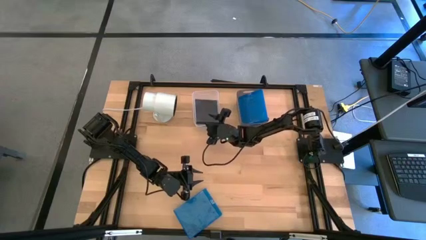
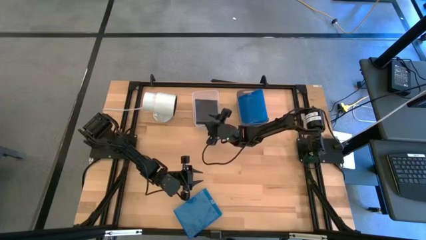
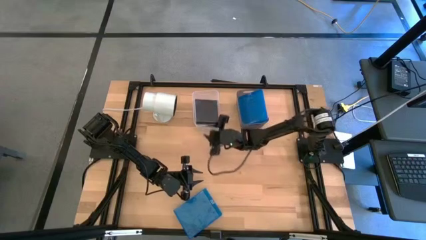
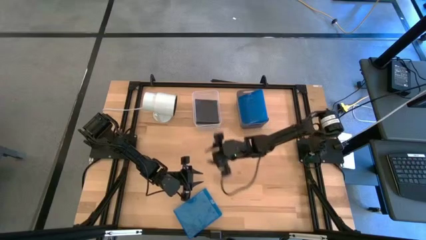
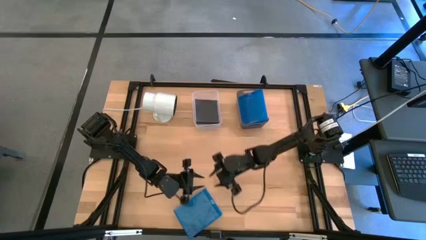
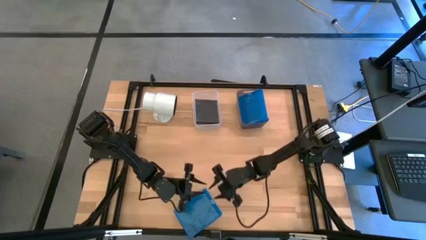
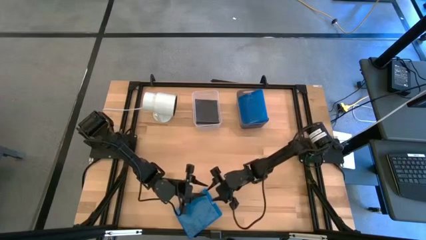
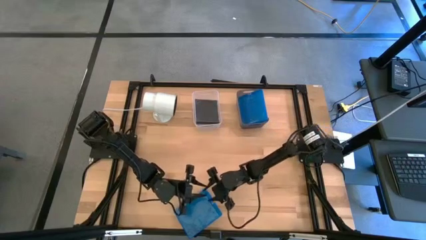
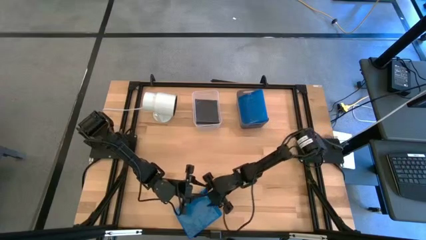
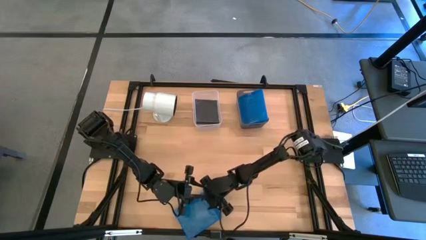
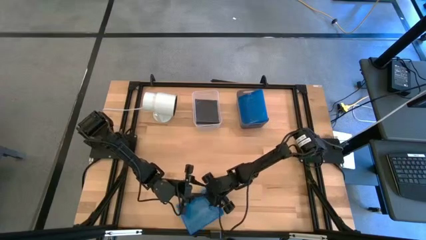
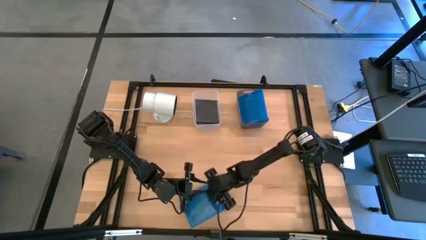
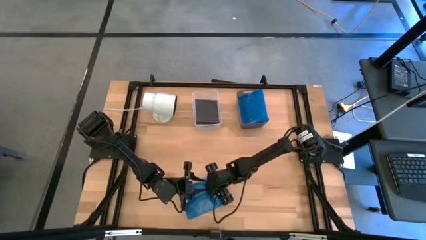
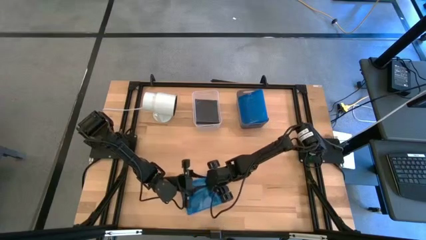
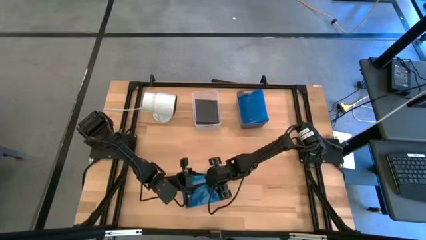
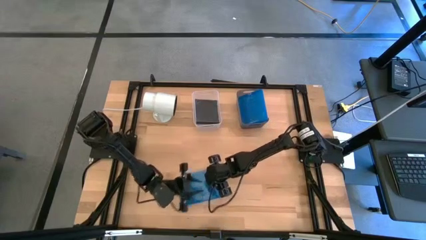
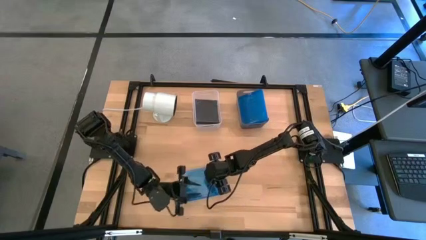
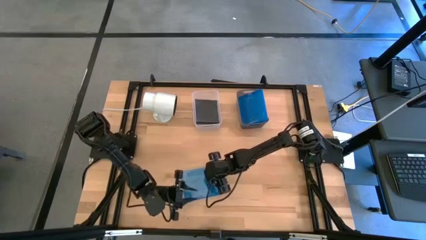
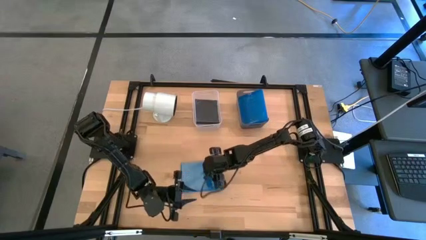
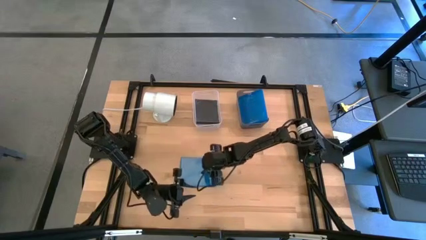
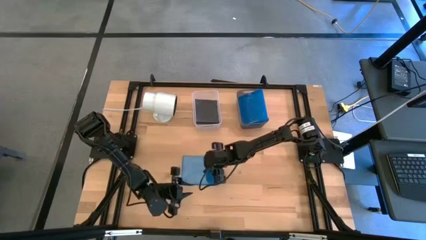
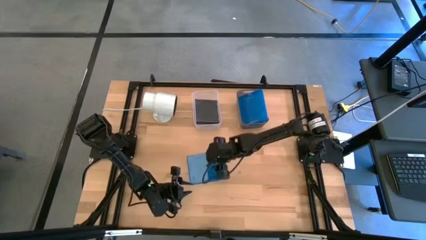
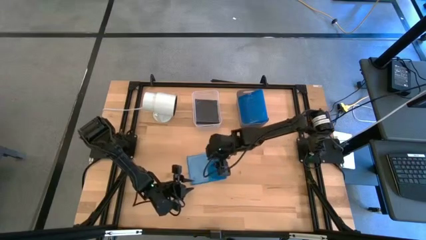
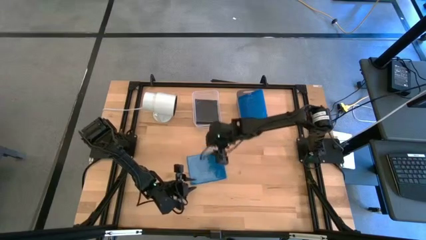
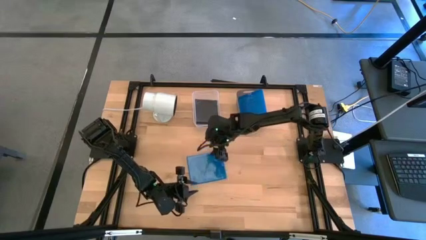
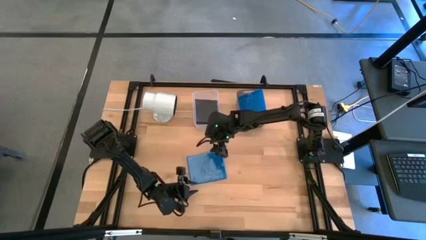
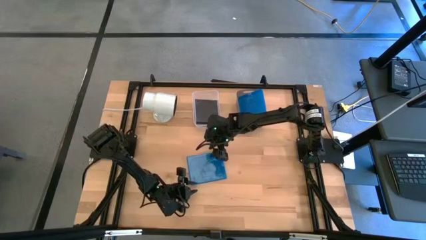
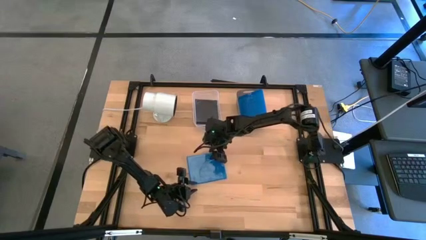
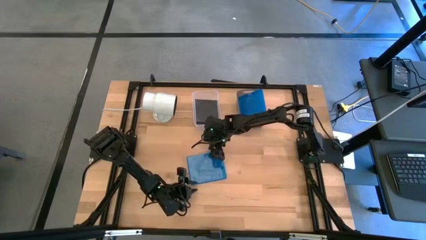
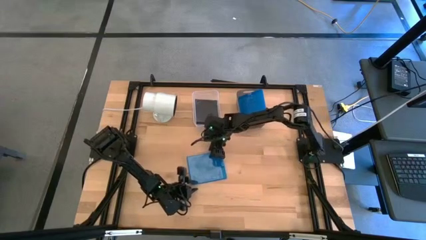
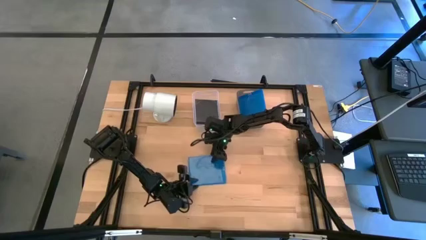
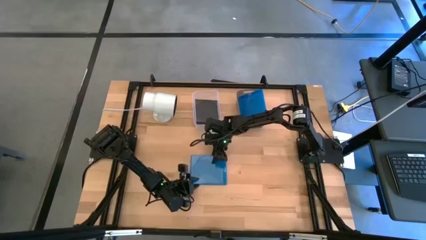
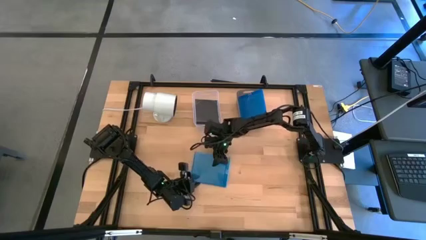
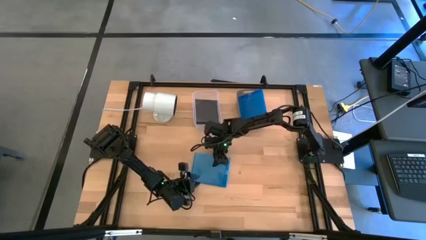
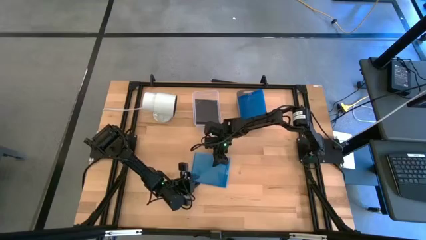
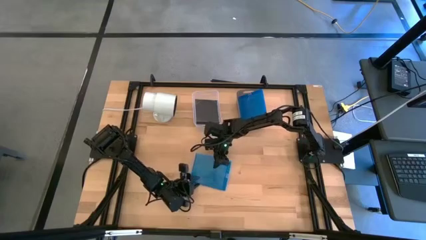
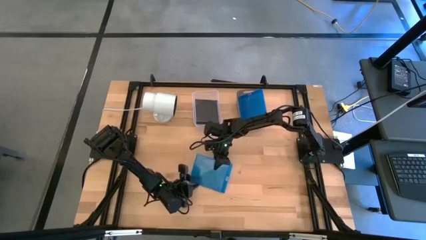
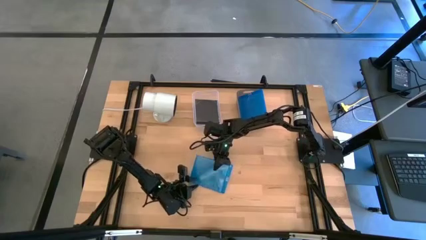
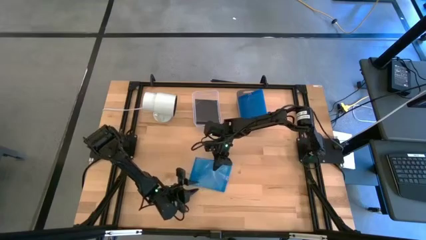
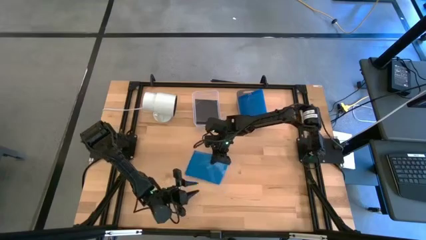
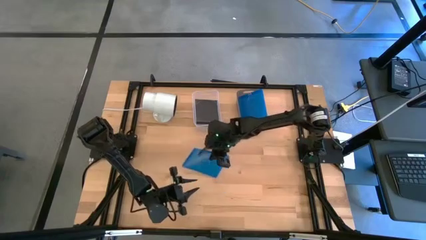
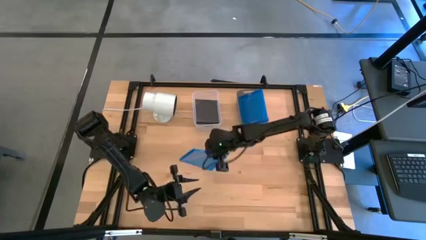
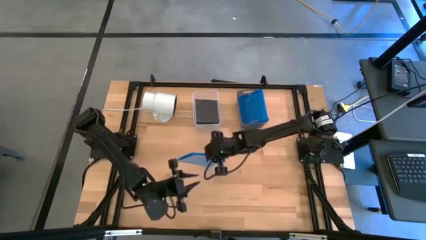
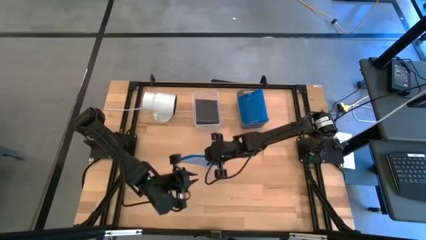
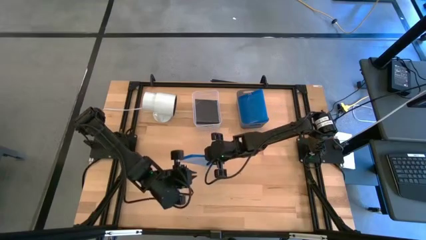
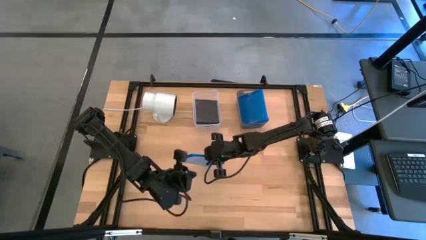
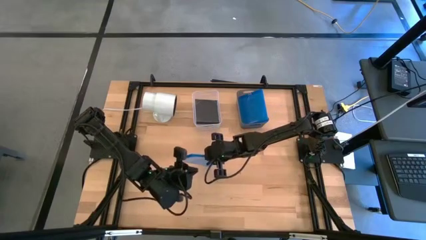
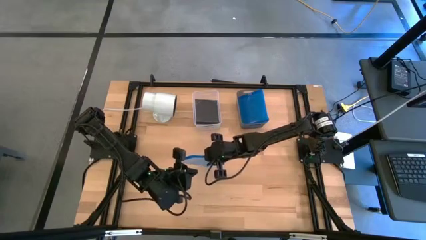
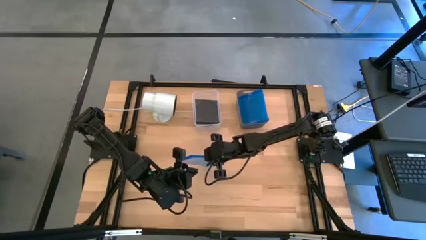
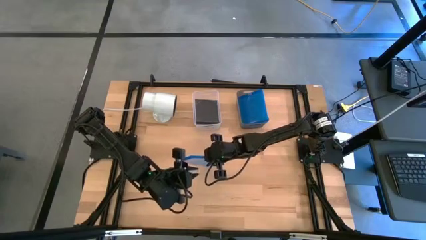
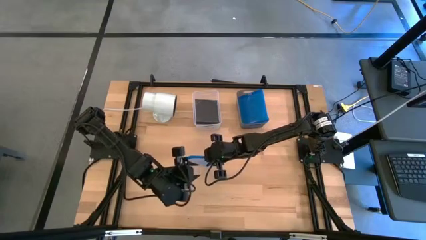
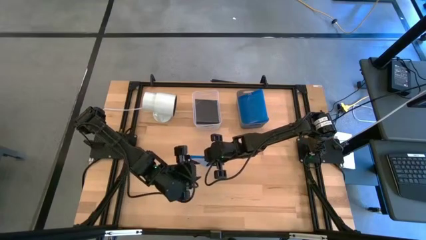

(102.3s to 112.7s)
Task: Pick & place jewel cases by type
Put the blue cd case into the gray bin

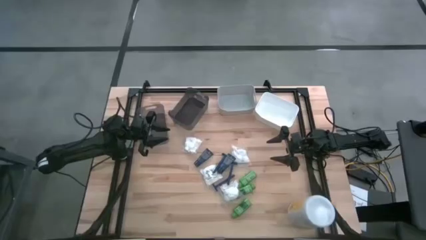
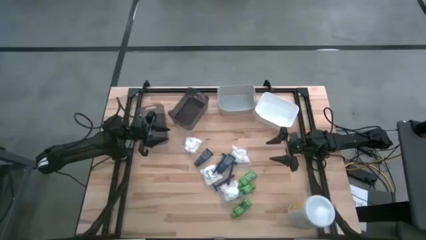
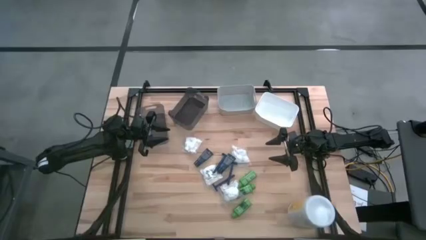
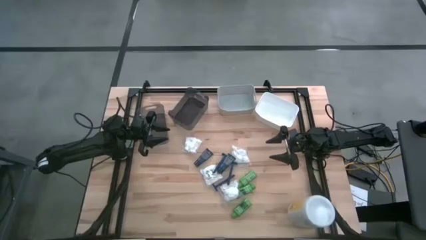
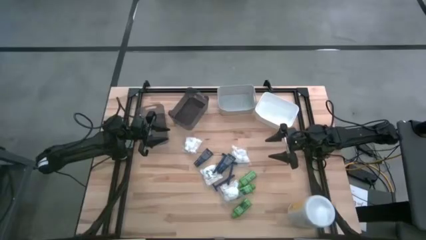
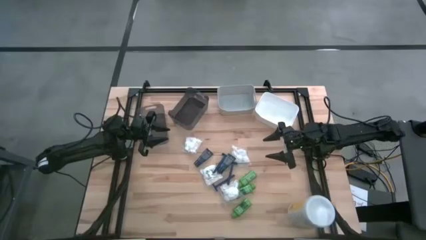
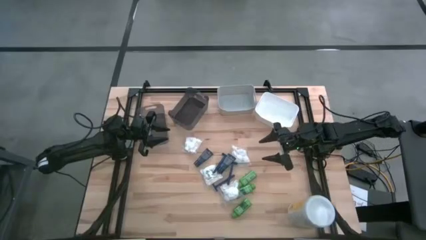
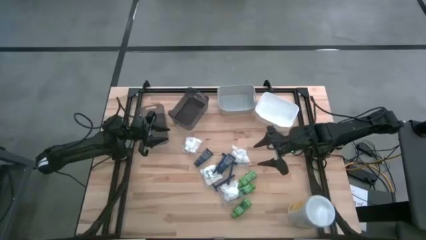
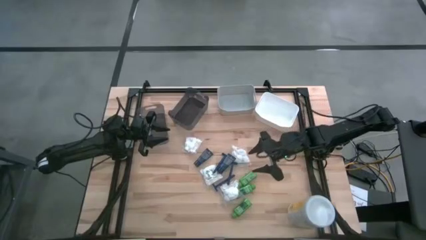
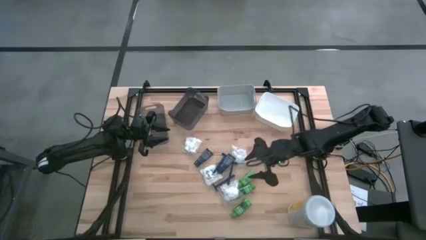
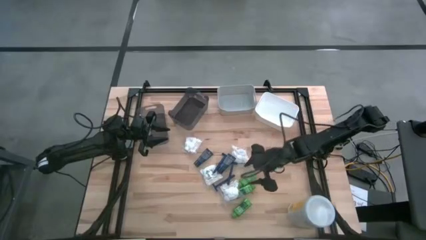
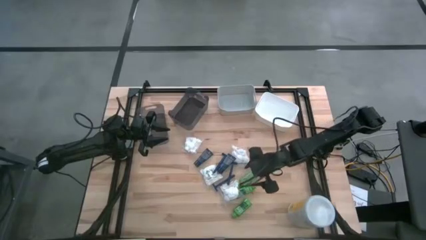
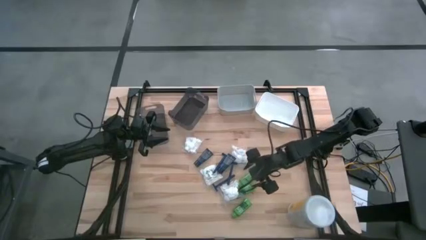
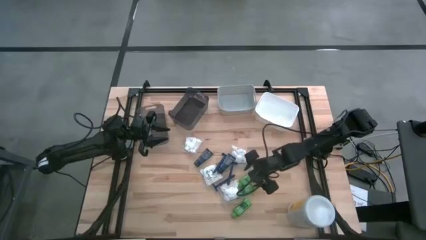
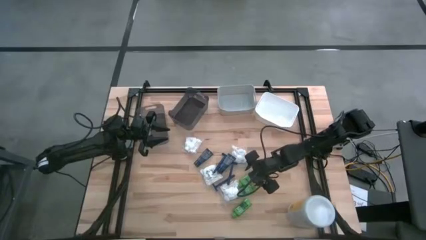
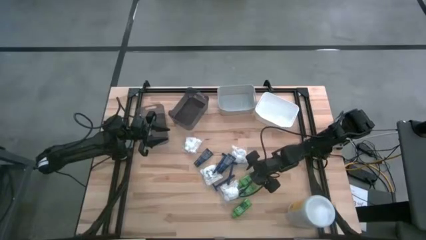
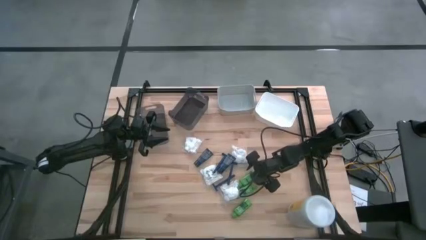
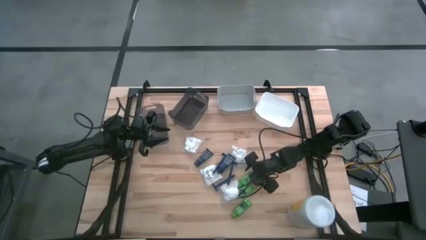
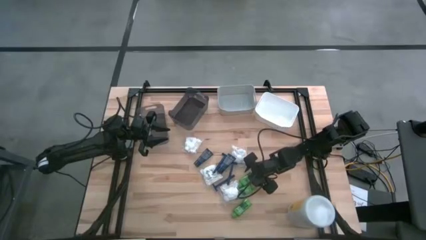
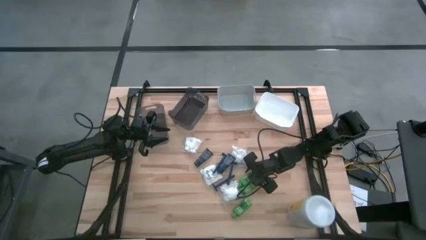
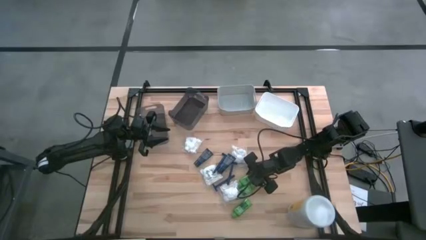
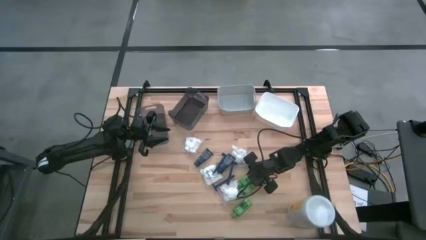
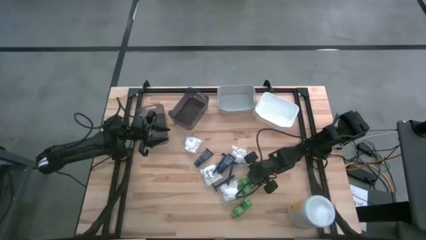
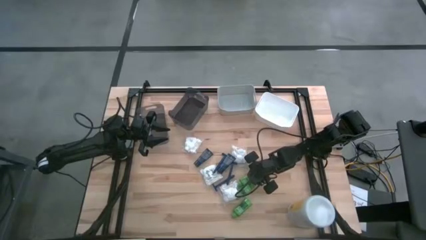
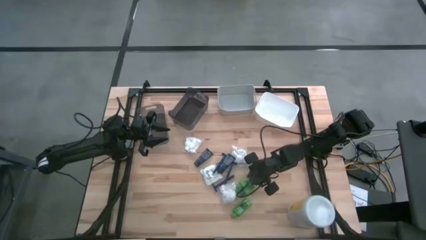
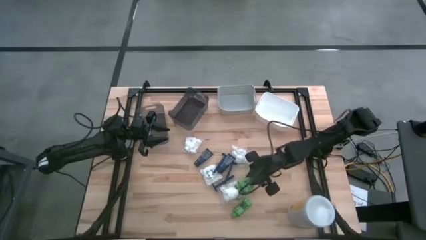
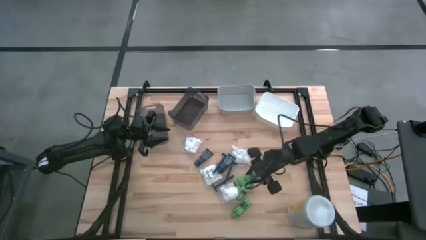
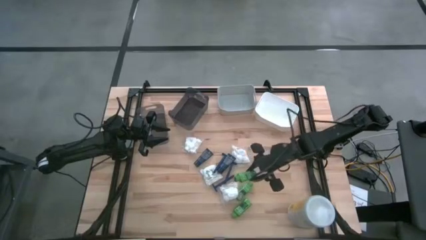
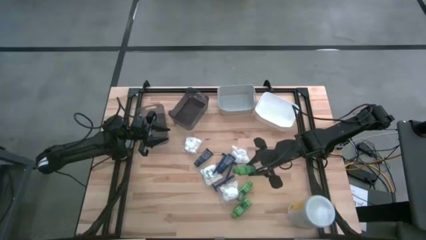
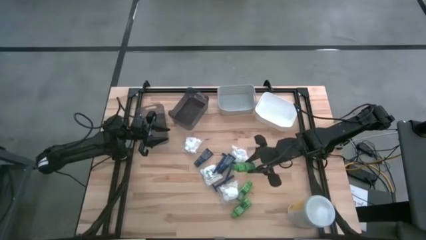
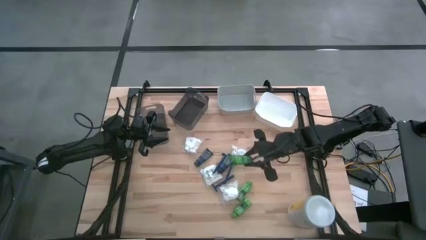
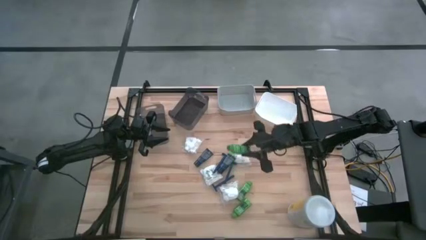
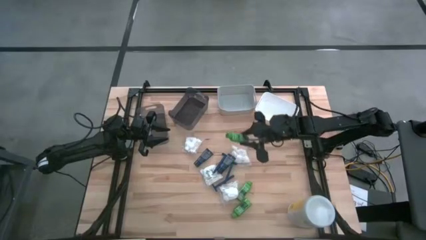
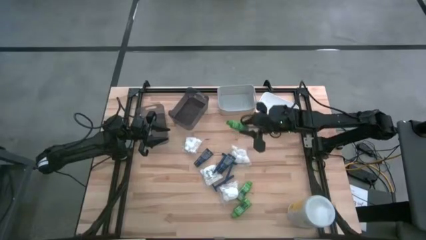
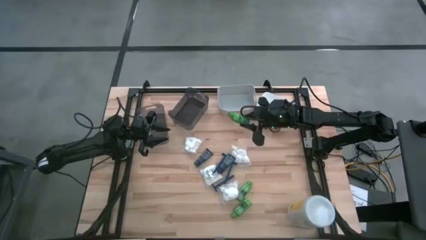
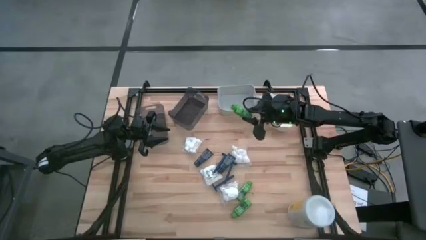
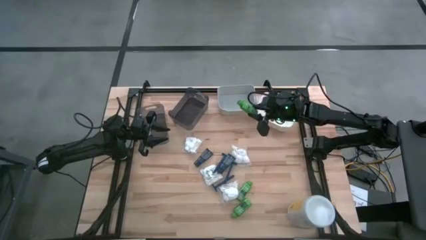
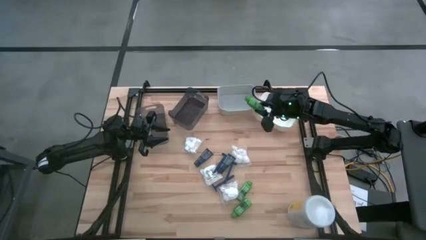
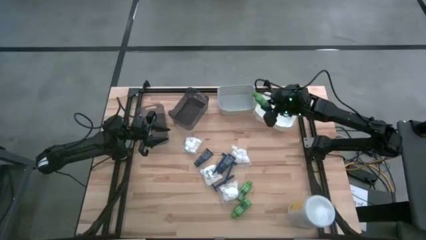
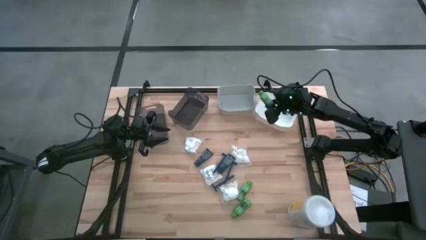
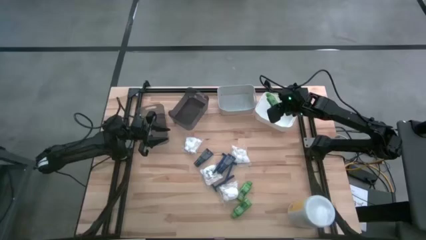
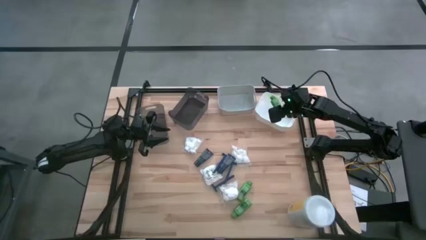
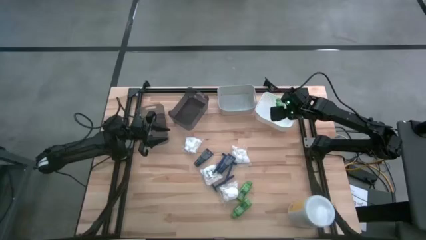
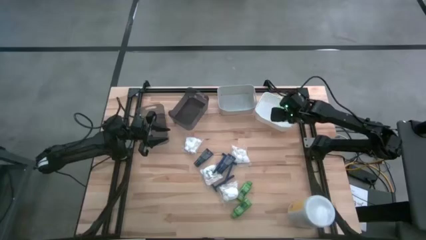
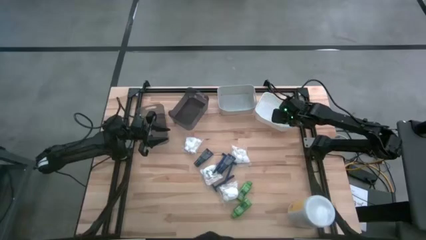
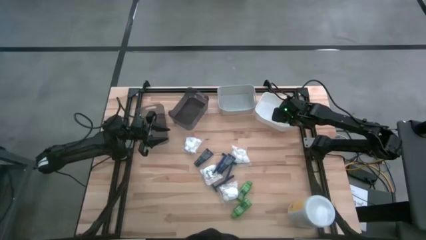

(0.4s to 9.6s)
Task: Pick & Place Travel size toiletries
Put the top green shampoo into the white bin
